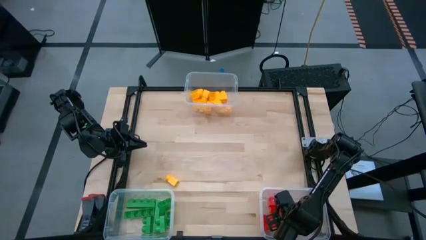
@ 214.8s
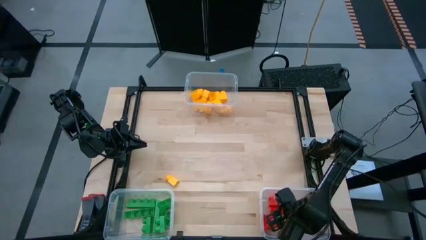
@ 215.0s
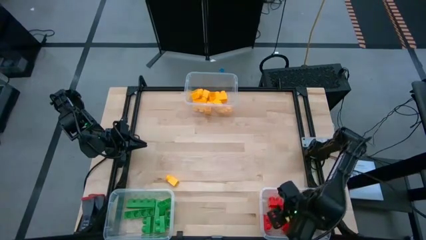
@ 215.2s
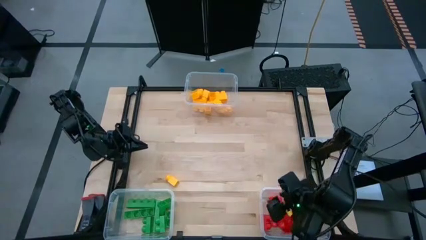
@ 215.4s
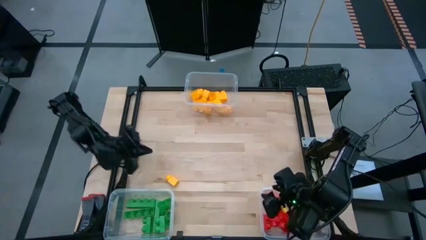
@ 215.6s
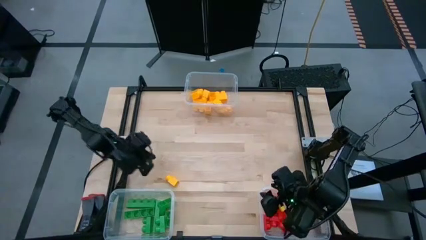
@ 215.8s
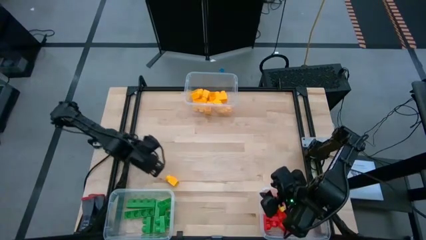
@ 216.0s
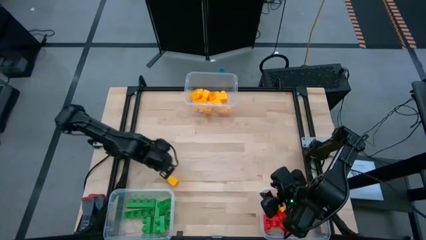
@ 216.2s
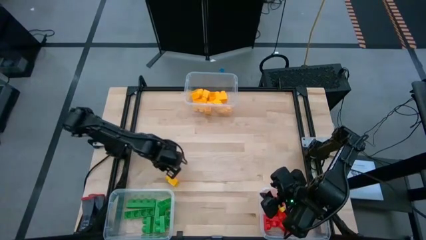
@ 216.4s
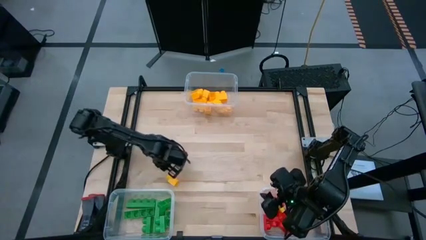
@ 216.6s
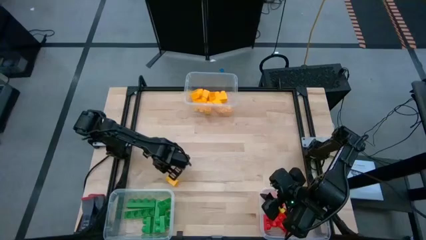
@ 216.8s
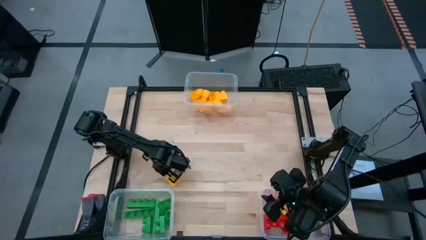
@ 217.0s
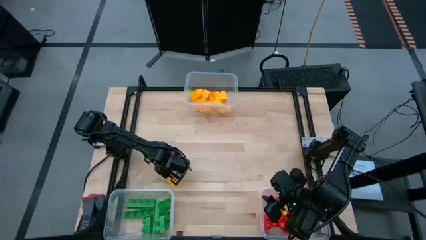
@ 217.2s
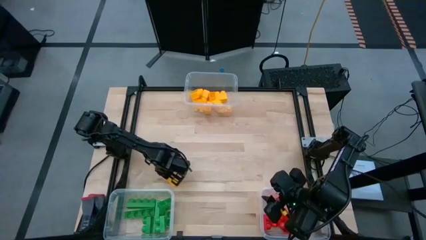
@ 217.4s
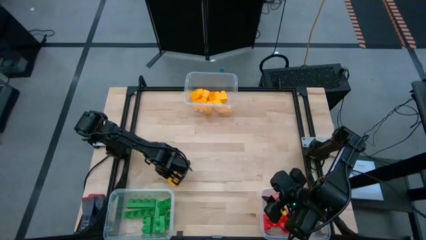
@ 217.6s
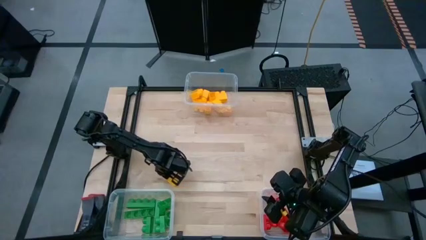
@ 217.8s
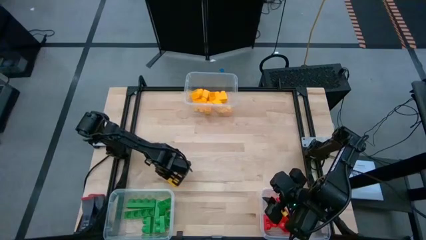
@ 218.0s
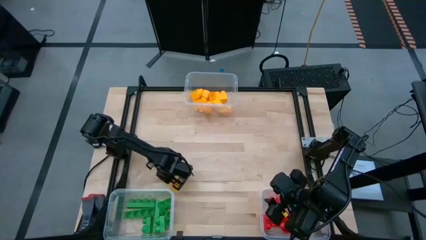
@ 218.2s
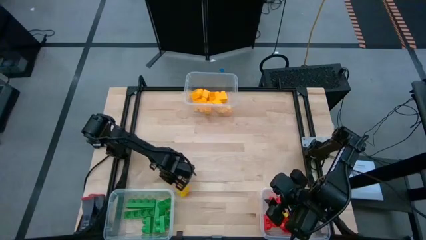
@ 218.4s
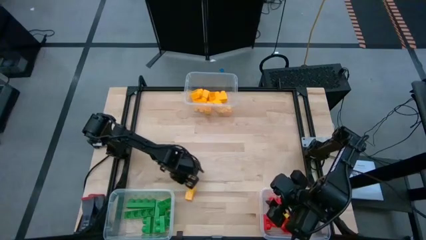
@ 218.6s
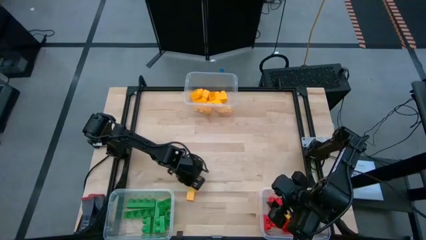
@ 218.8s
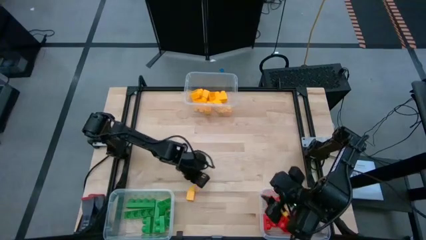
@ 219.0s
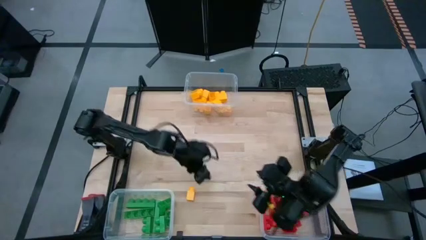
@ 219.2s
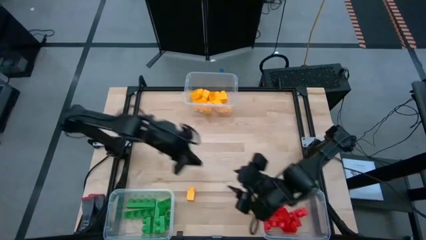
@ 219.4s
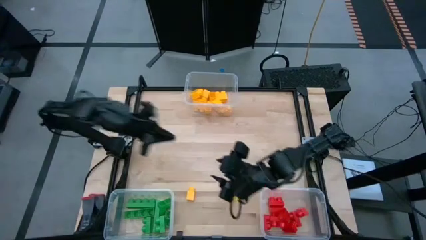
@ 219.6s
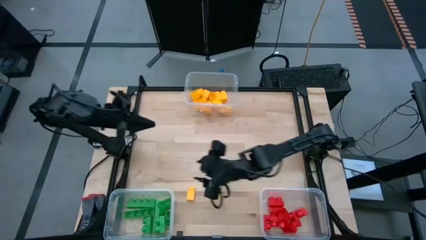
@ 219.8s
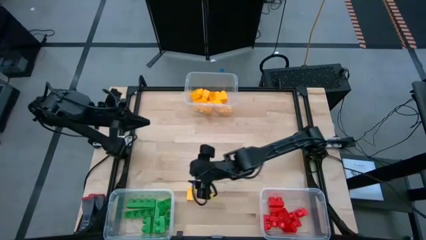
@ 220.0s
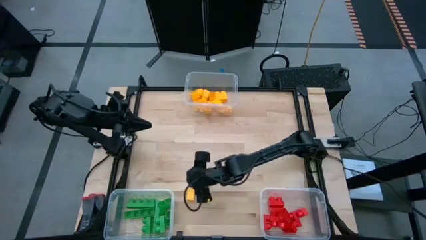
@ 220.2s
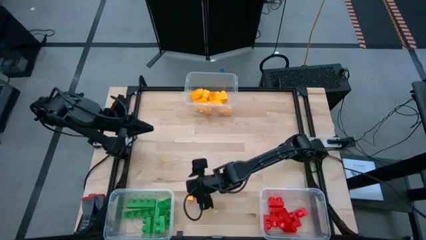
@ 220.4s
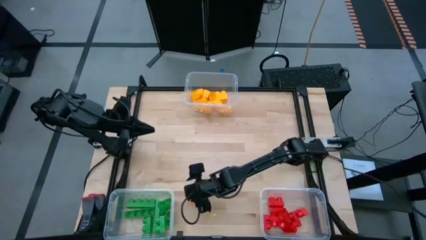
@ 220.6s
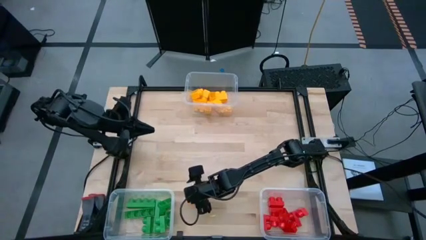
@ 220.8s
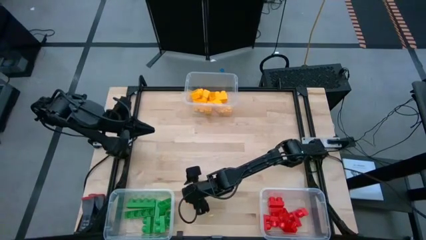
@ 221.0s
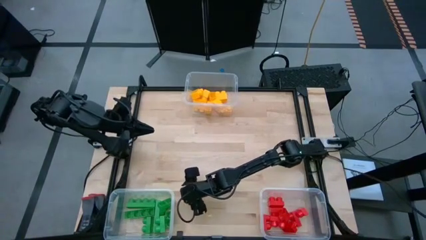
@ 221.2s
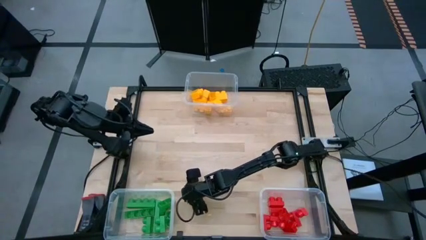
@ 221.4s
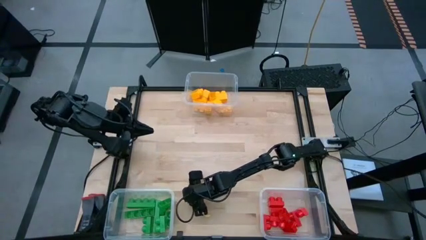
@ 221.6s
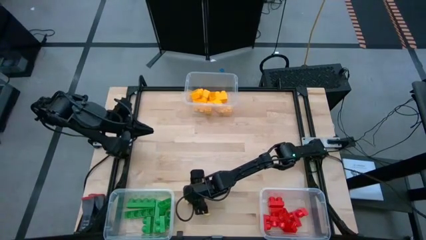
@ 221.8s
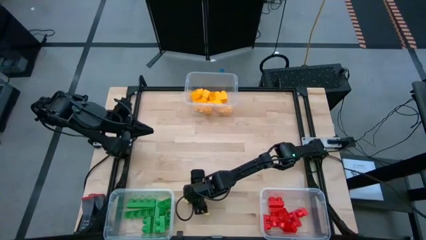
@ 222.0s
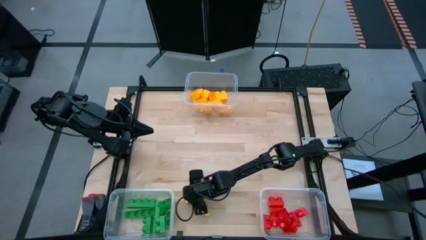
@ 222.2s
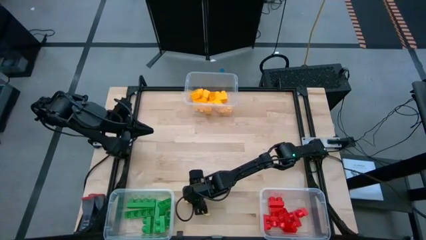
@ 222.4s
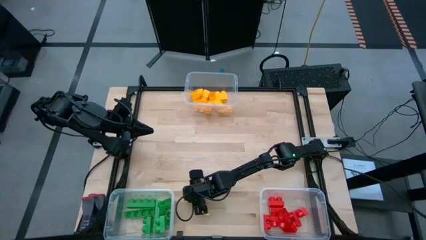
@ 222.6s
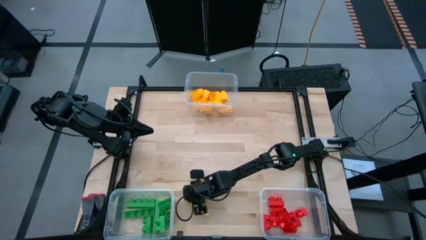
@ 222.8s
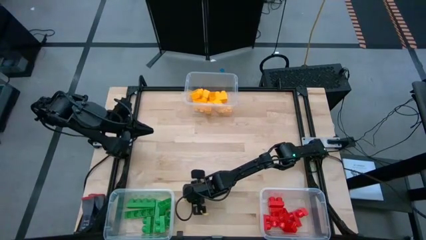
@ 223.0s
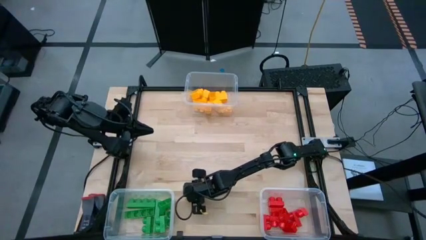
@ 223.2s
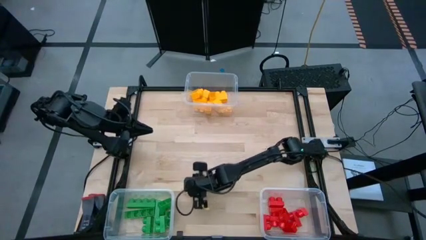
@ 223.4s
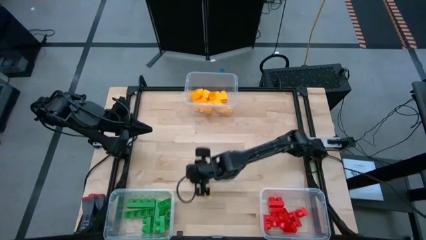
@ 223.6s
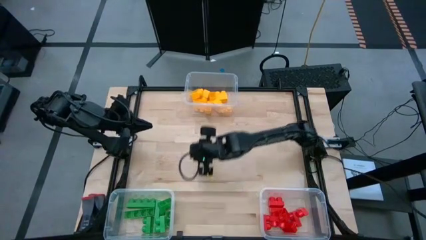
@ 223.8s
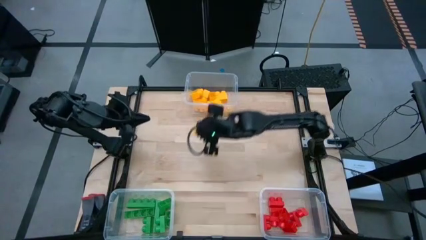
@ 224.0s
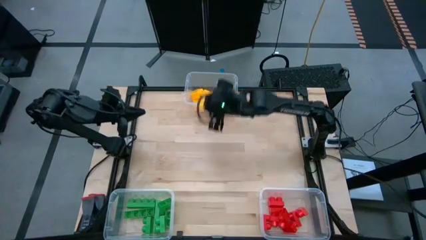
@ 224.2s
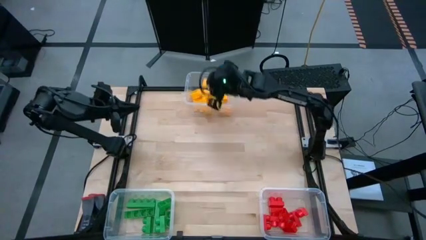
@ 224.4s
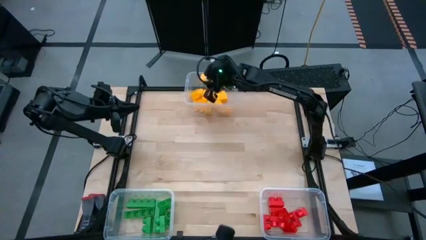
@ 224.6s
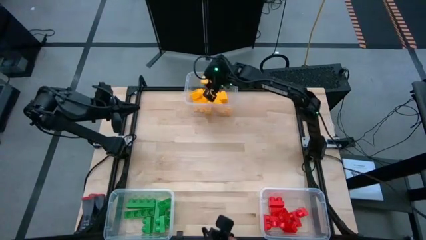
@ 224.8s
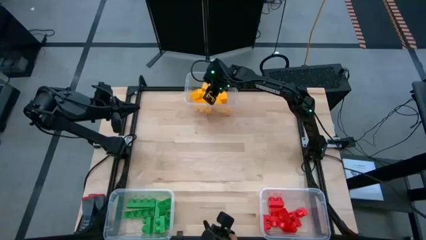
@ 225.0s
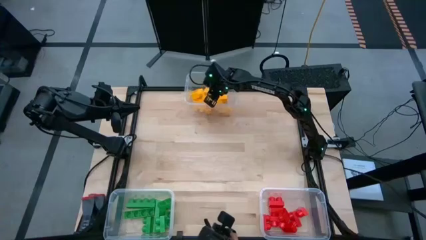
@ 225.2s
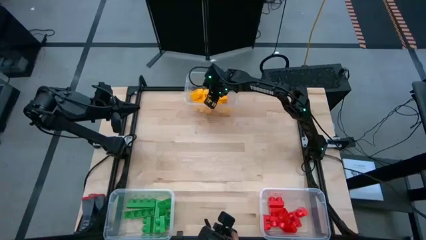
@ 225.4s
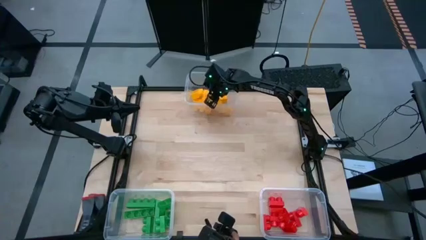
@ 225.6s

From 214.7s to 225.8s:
Task: Sort blocks
Put the yellow game piece into the top transparent bin

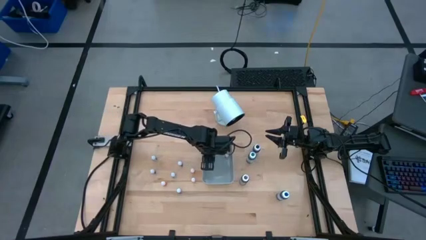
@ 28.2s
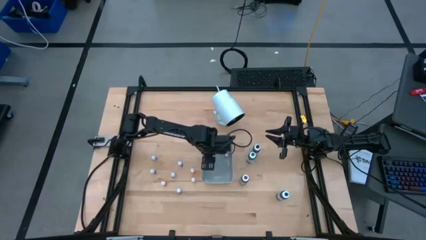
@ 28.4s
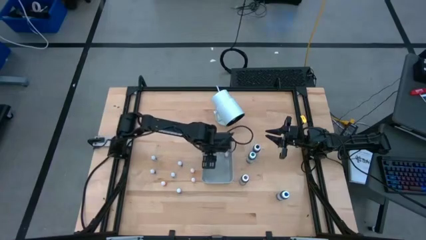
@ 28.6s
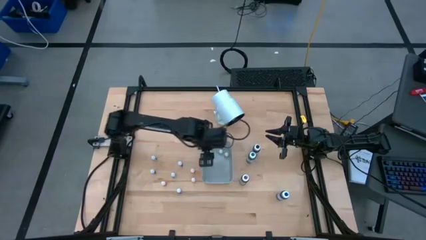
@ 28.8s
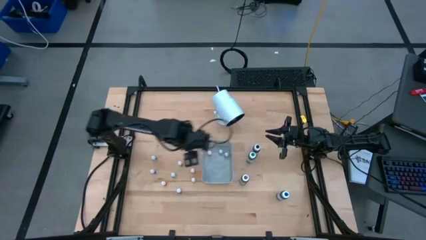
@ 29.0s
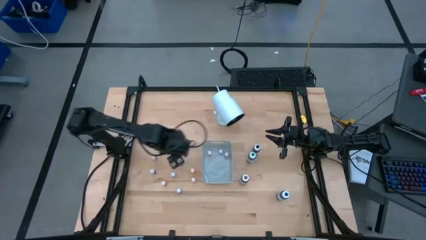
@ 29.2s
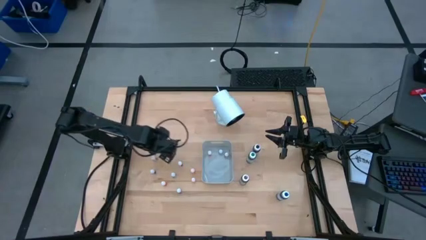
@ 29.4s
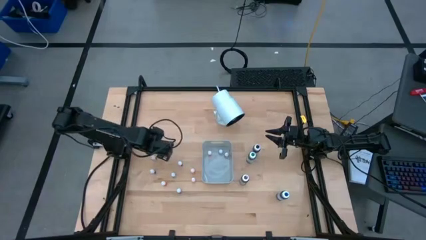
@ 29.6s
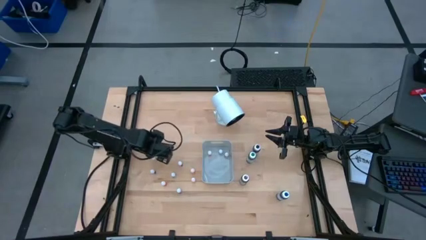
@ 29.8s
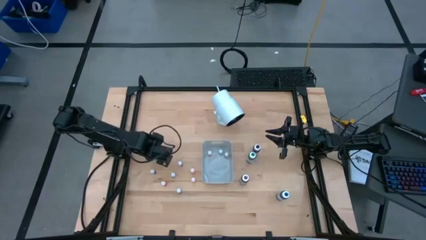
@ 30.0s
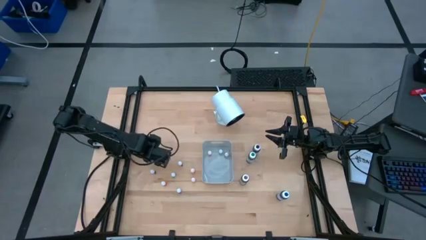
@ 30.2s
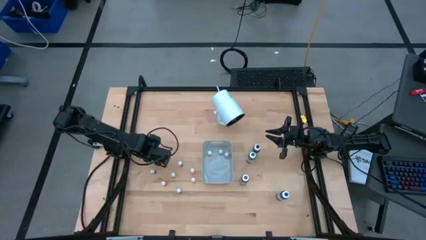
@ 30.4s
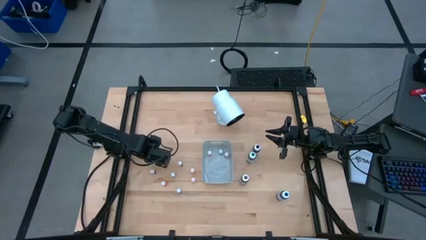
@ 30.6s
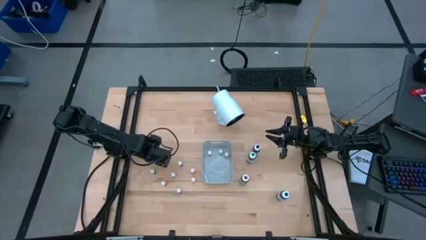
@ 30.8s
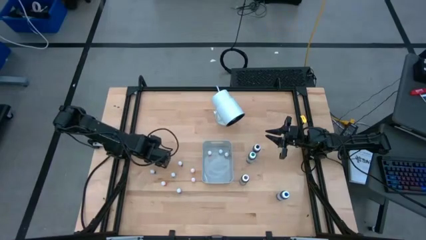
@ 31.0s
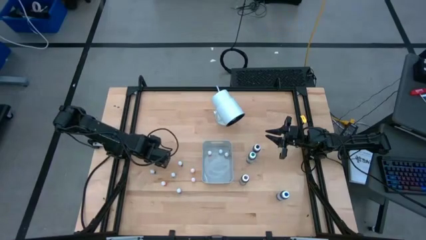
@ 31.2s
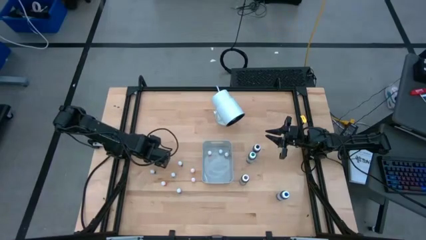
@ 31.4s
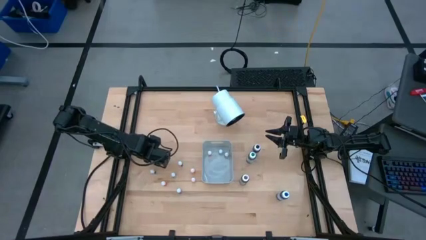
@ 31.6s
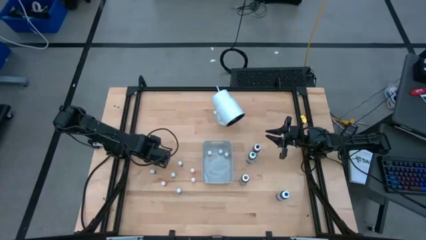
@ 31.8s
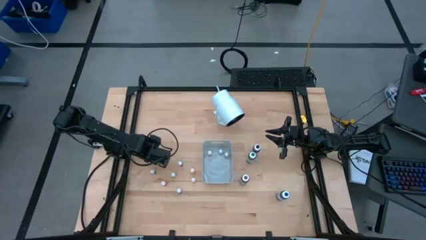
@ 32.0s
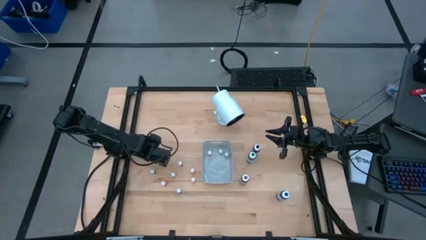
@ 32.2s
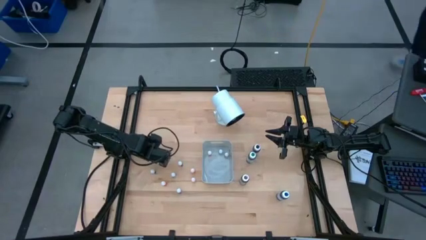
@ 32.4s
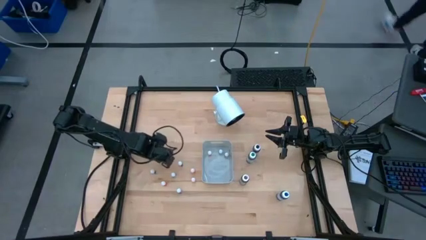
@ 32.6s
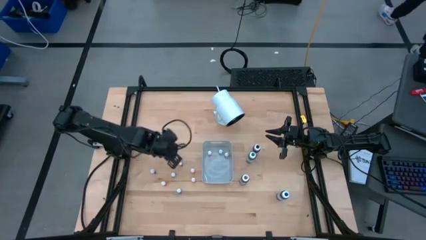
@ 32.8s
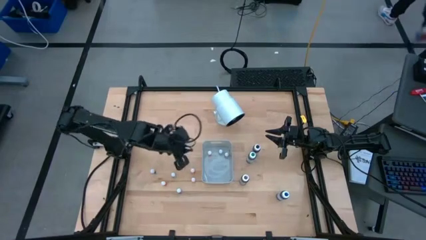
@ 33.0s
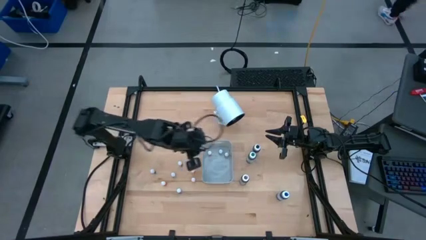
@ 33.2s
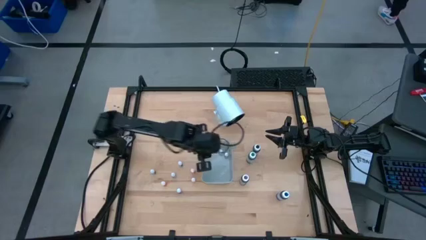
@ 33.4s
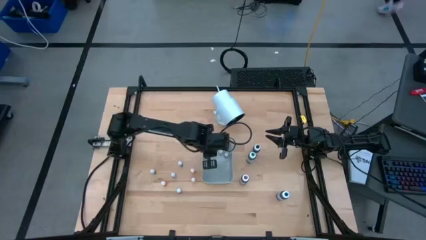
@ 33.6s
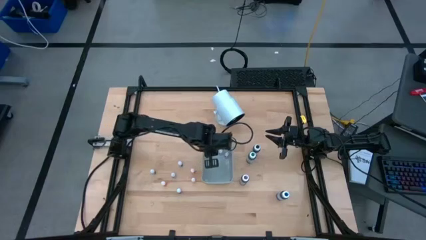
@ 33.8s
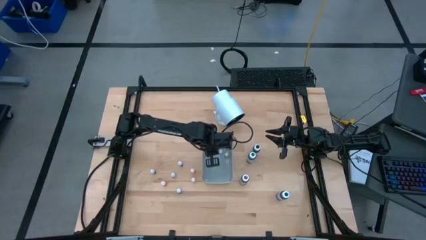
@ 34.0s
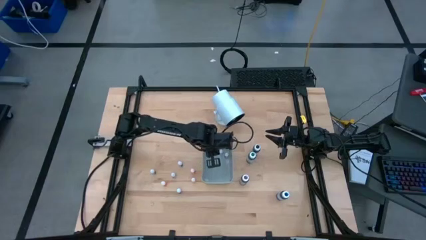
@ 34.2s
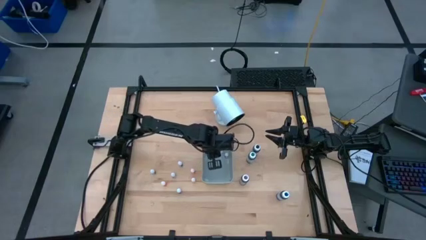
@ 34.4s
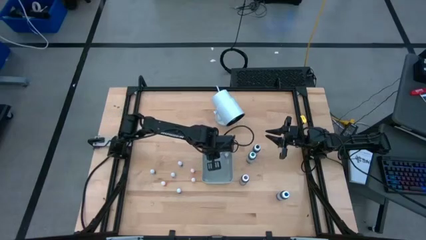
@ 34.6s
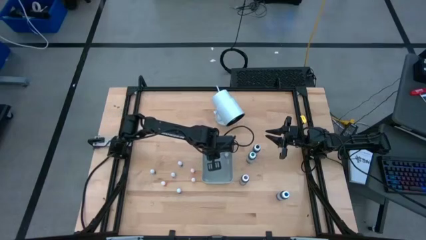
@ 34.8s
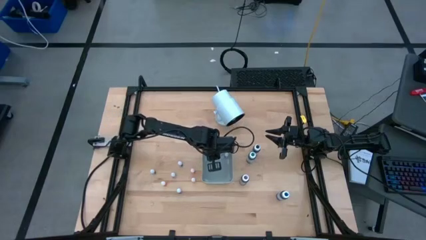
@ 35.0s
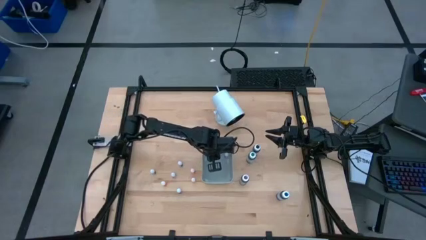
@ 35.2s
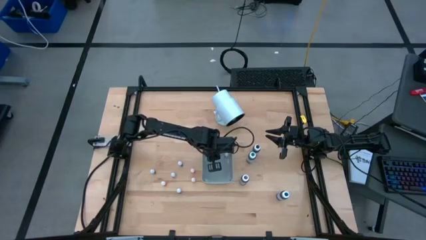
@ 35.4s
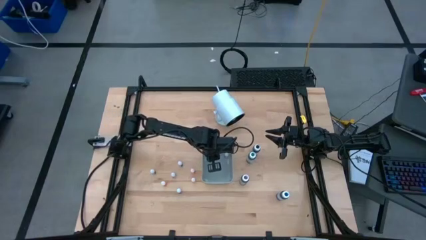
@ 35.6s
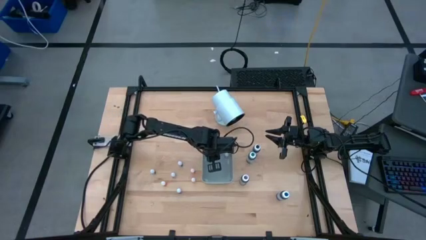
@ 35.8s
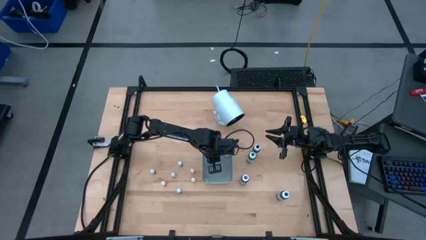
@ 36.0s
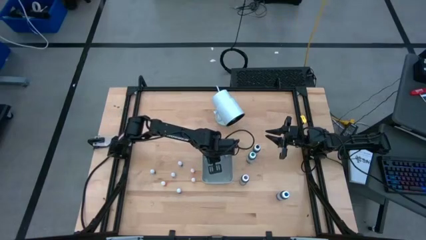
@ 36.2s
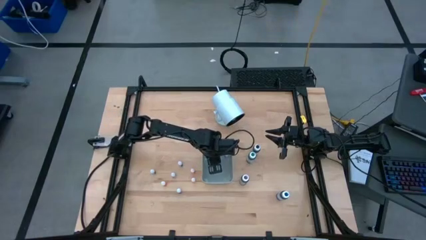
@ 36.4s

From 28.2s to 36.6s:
Task: Pick & Place food coloring
Put the small green food coloring bottle into the gray bin
